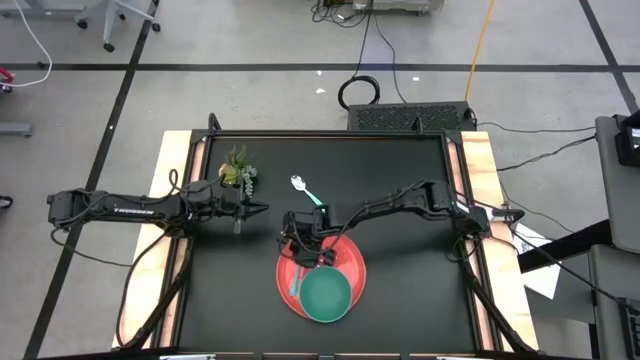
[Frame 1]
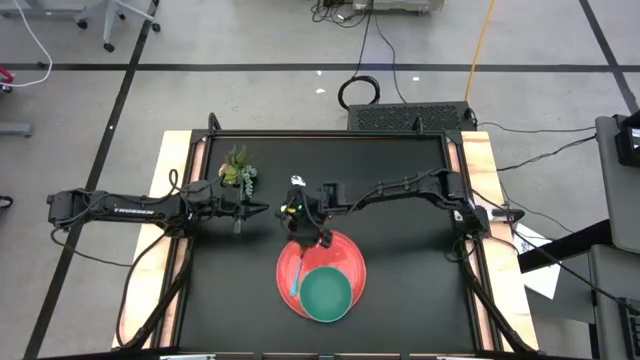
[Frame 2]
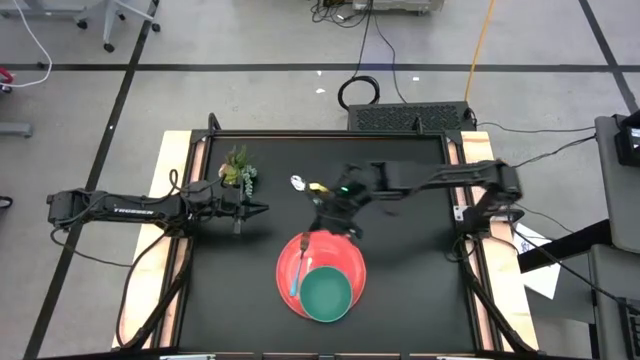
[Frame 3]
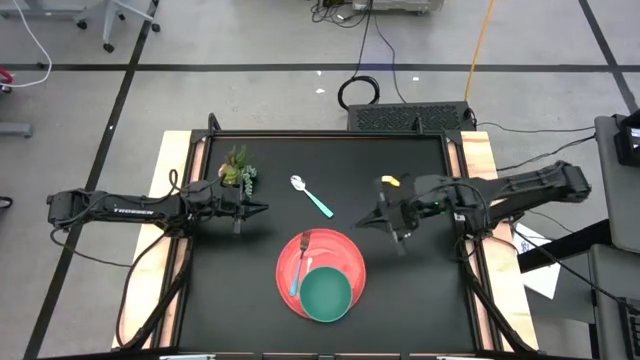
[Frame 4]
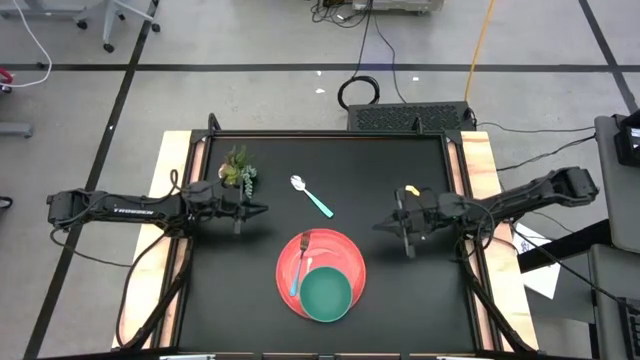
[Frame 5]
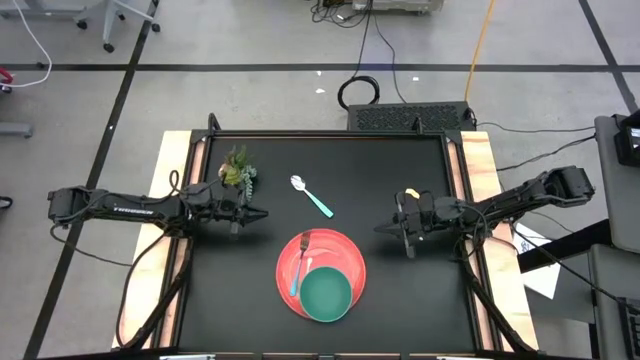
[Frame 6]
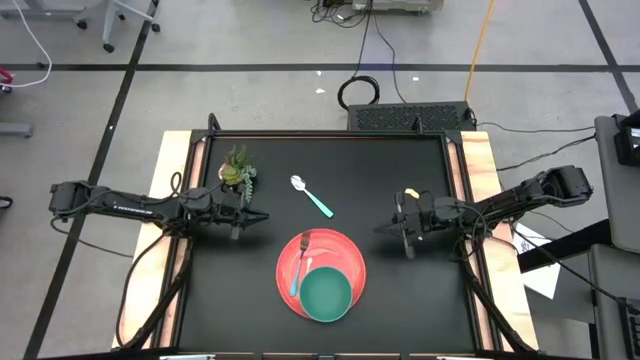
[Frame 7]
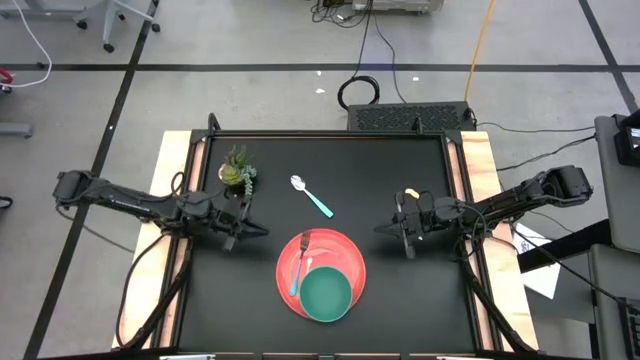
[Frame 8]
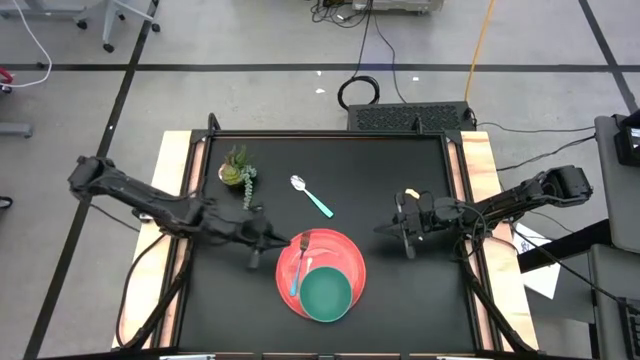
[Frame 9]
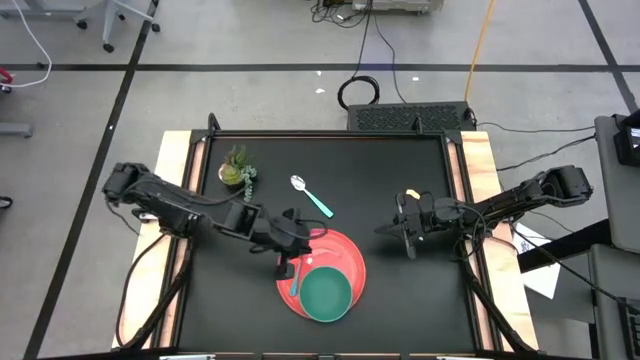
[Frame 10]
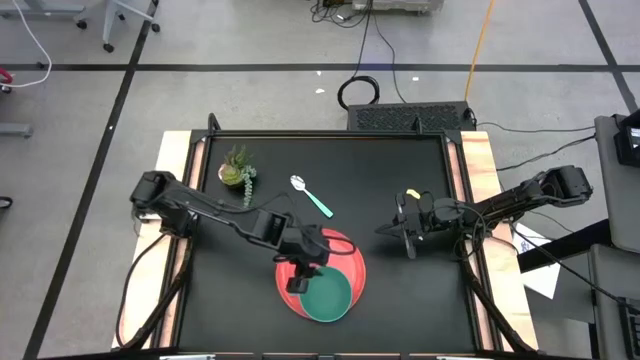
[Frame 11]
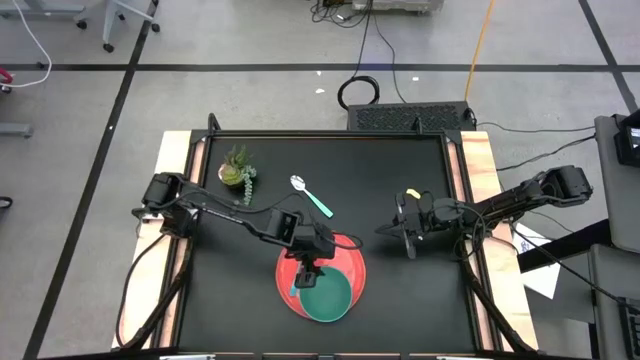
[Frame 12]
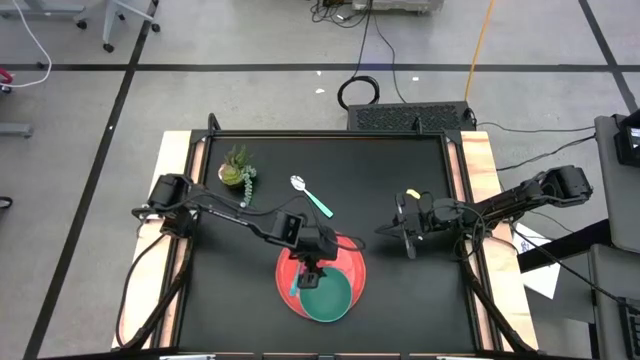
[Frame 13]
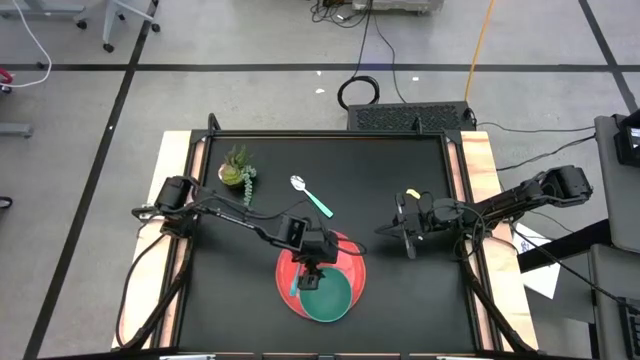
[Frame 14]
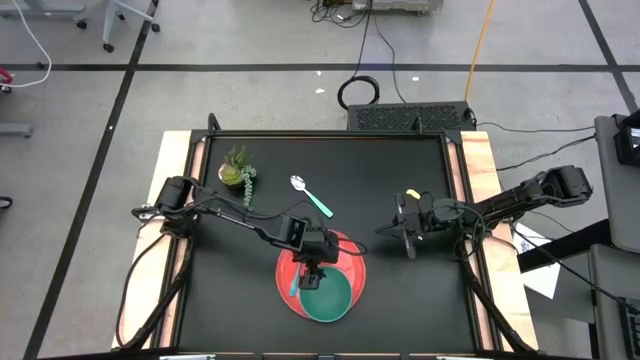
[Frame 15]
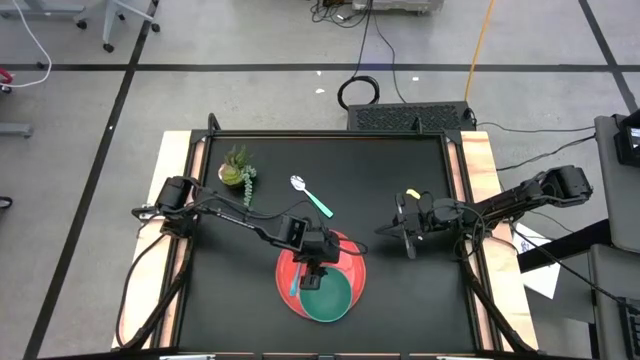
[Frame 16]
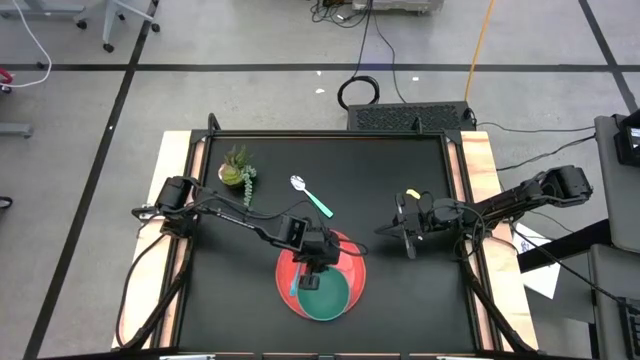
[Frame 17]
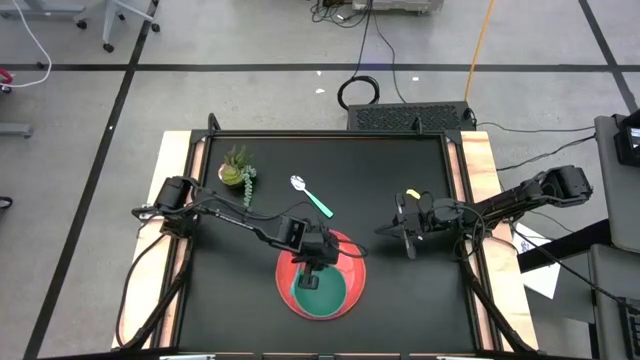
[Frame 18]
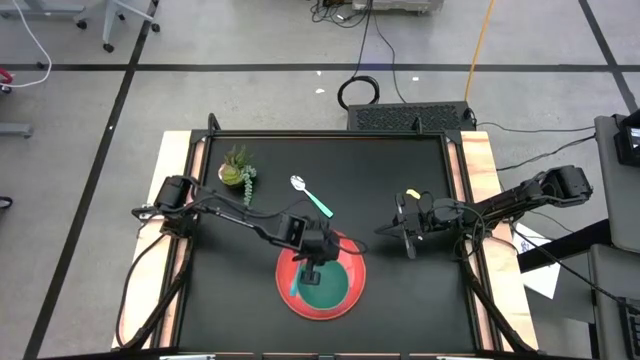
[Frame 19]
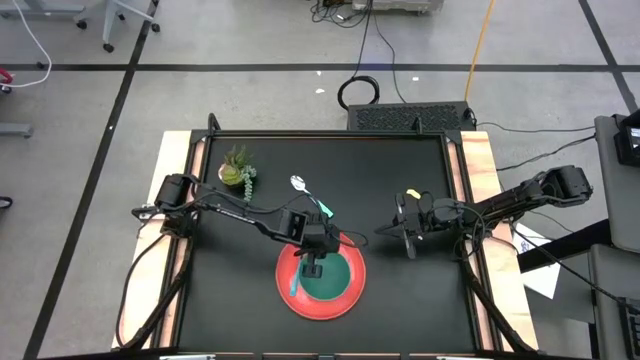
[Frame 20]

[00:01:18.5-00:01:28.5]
Task: Set table place
Adjust the green bowl on the orange plate

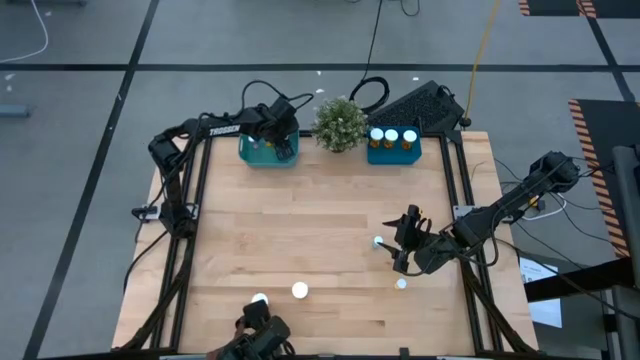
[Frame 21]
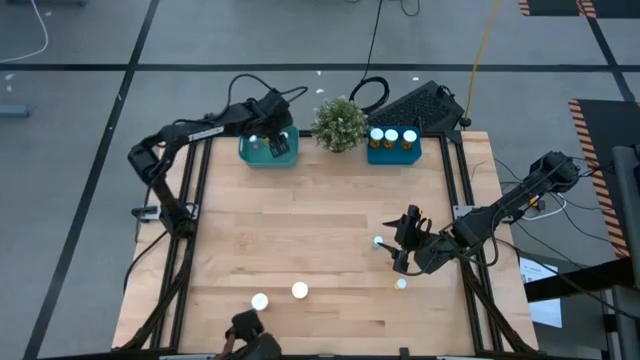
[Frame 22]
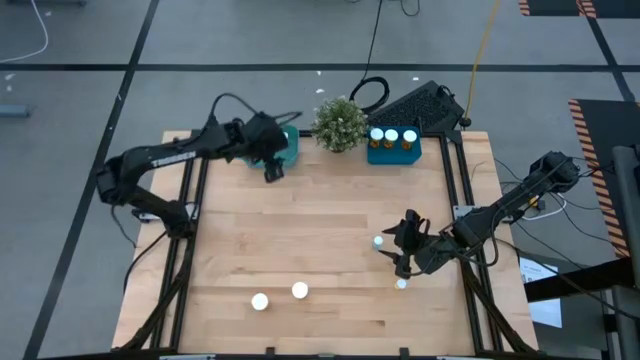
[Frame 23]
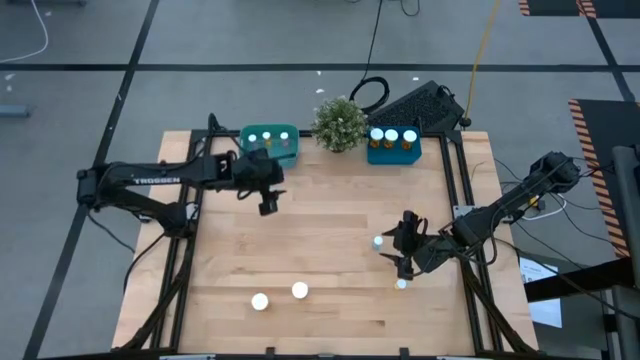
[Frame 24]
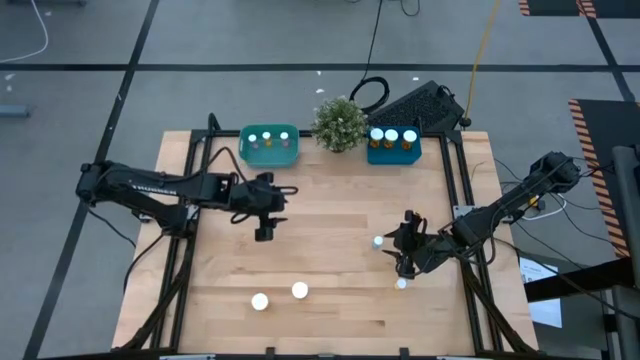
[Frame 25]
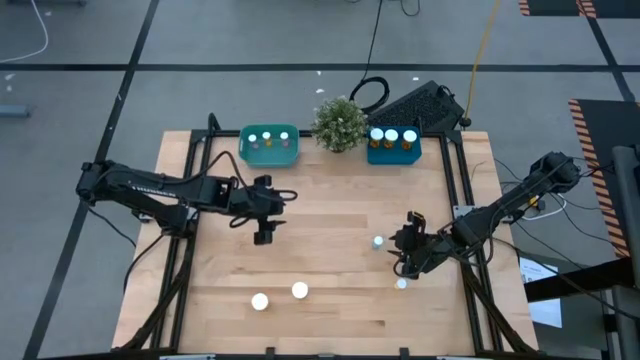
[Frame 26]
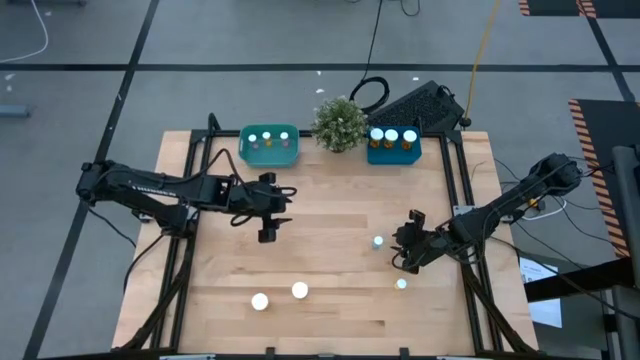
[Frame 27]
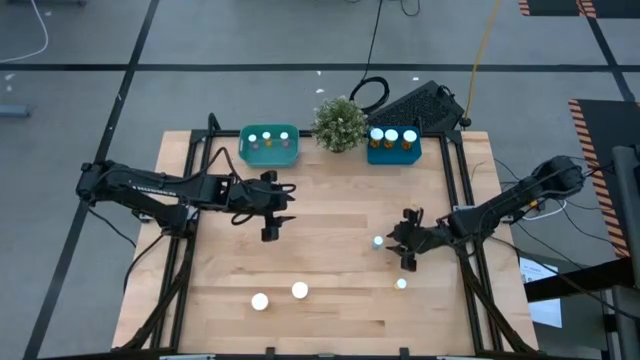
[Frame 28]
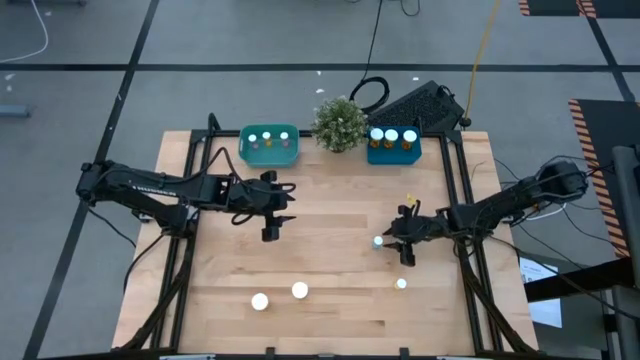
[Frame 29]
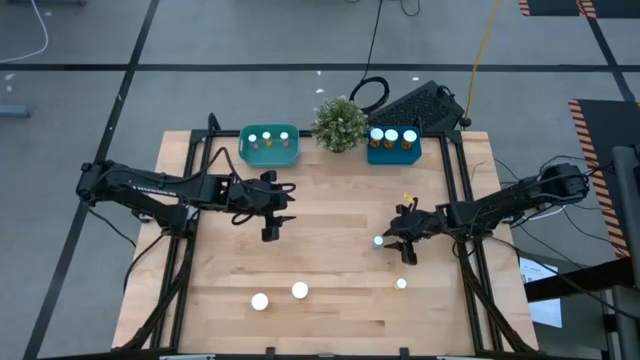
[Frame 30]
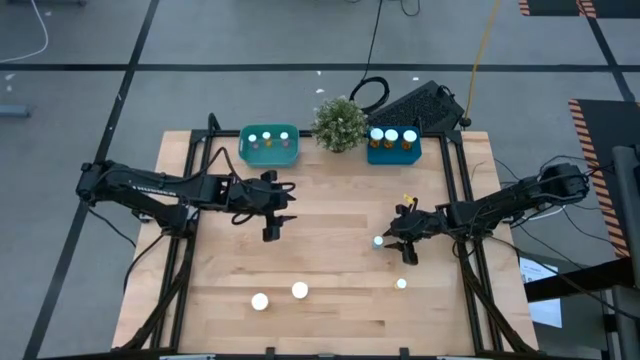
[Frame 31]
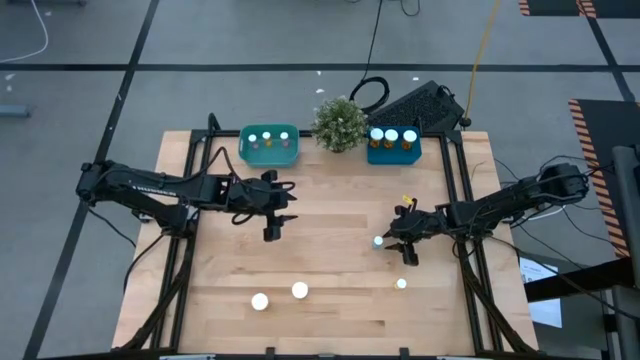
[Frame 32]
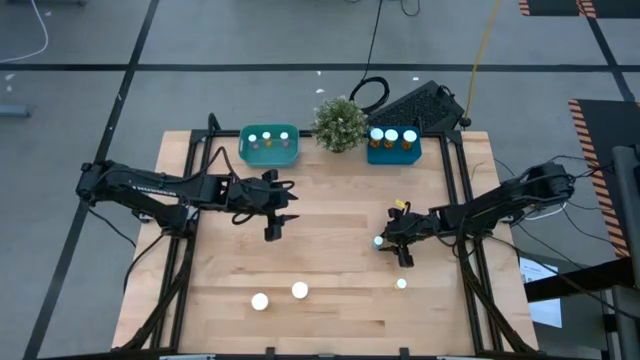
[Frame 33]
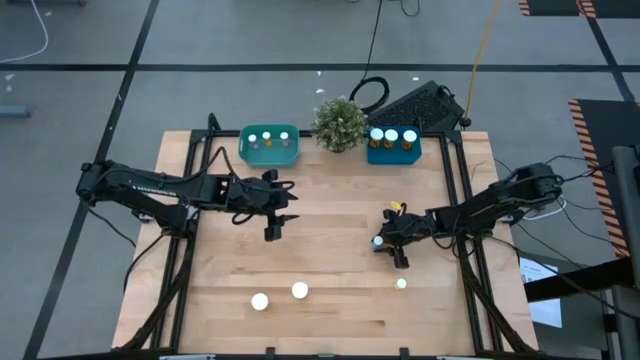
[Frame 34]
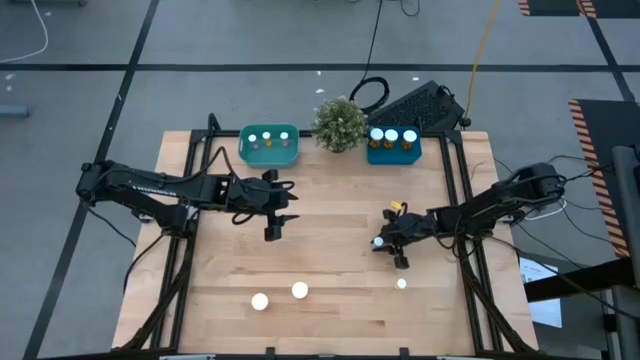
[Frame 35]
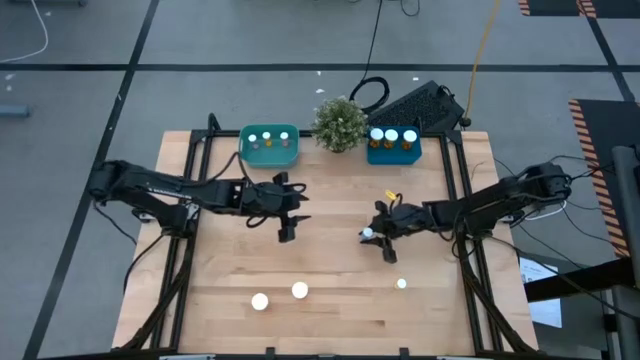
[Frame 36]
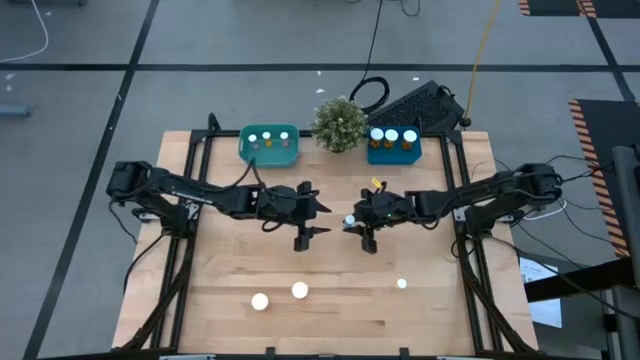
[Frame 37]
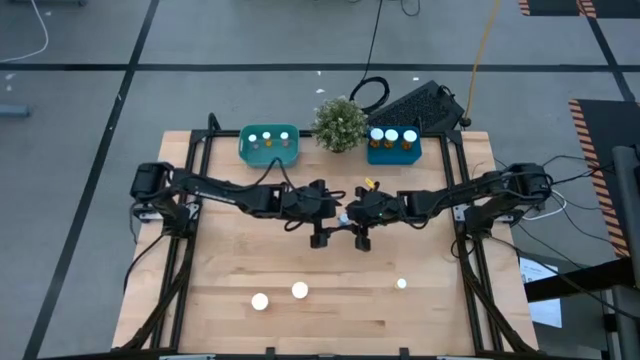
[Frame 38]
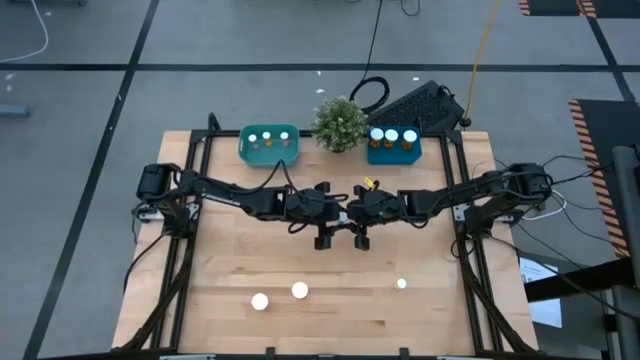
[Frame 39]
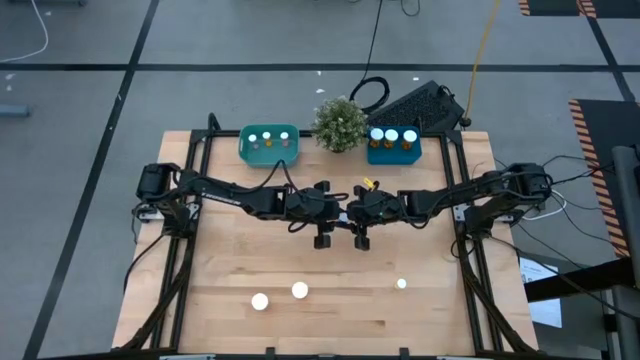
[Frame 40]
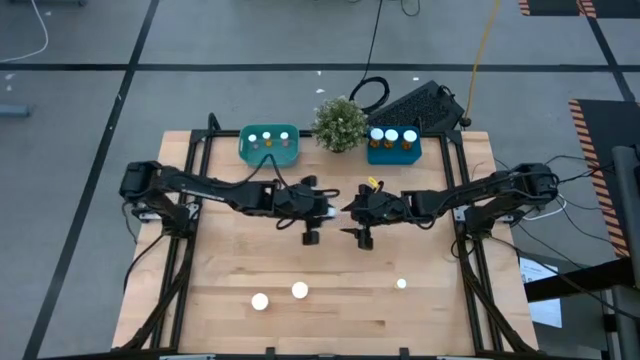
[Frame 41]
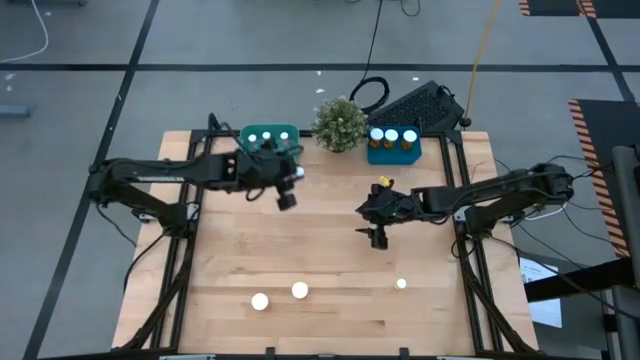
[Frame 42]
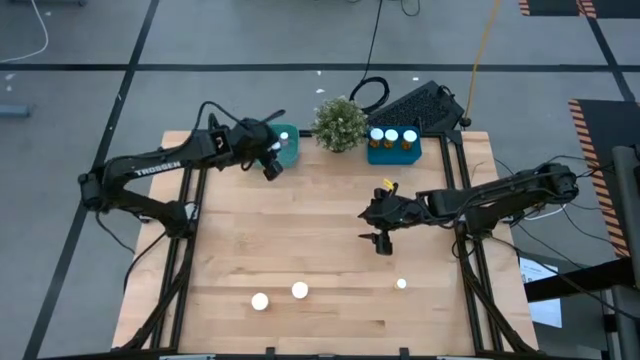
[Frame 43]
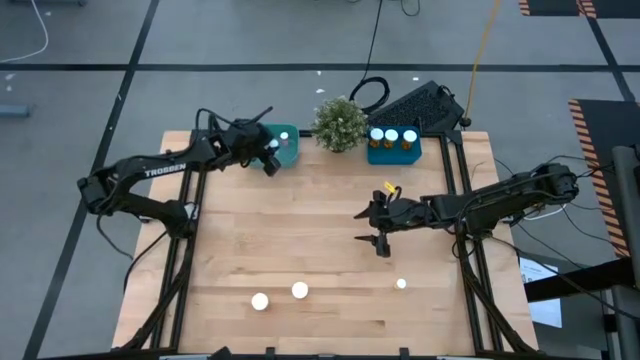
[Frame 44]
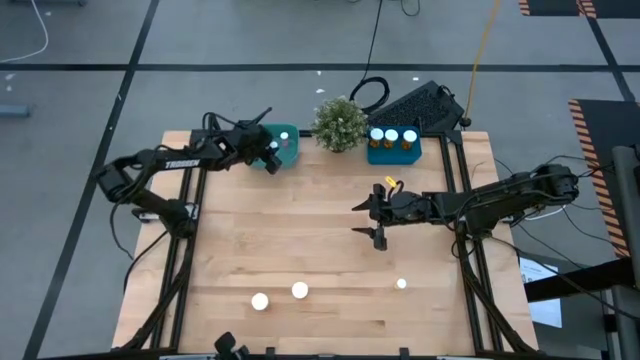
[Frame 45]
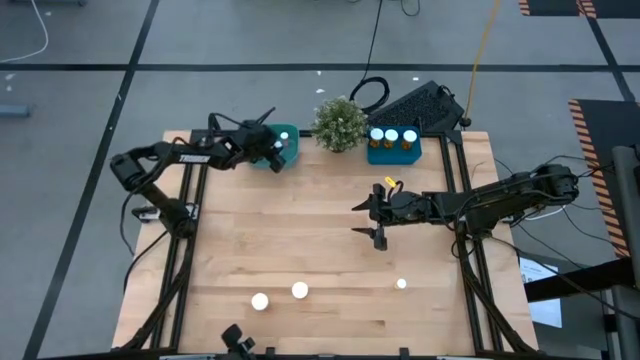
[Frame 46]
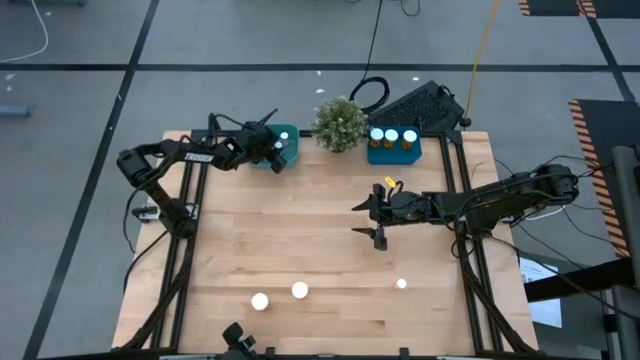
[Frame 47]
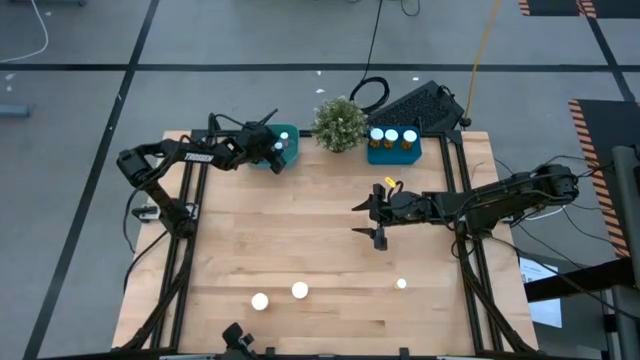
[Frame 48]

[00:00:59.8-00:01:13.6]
Task: Pick and place medicine bottles into bin by pill shape (circle, oval)
Put the small blue pill bottle into the green bin
